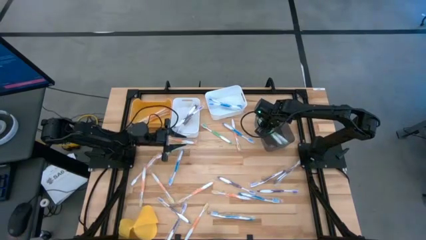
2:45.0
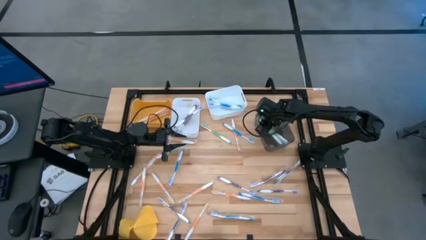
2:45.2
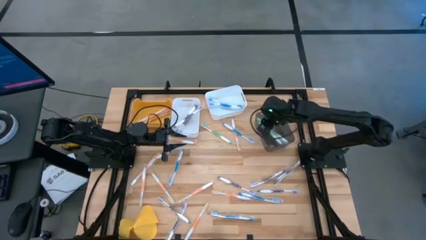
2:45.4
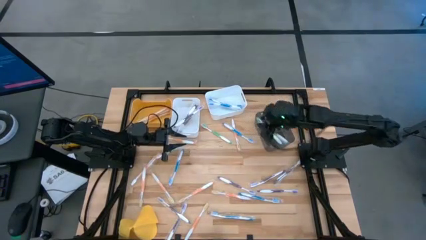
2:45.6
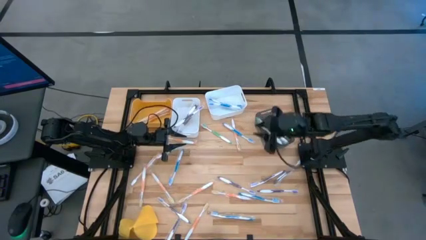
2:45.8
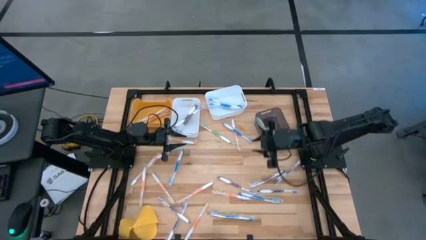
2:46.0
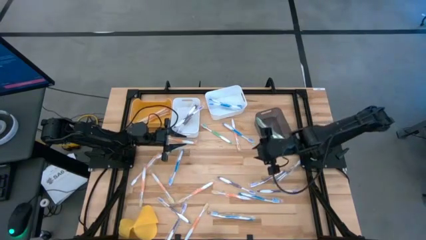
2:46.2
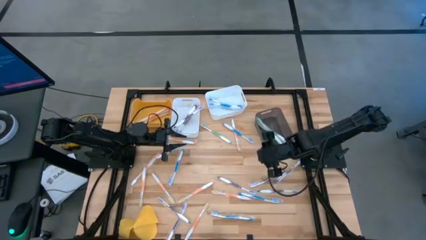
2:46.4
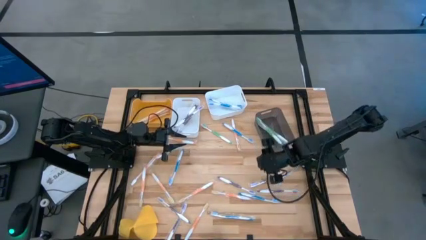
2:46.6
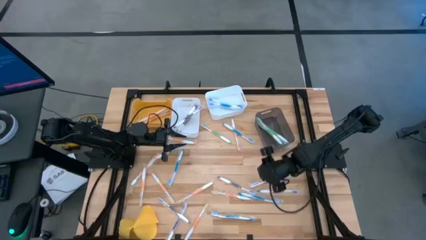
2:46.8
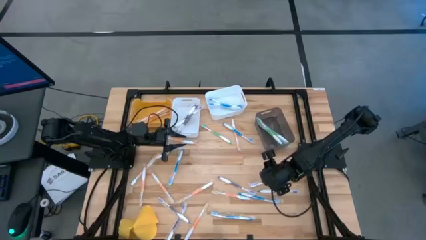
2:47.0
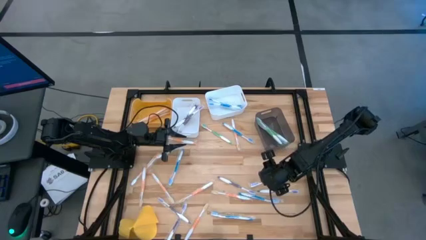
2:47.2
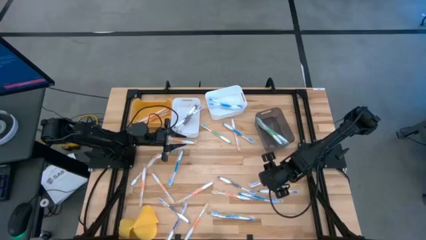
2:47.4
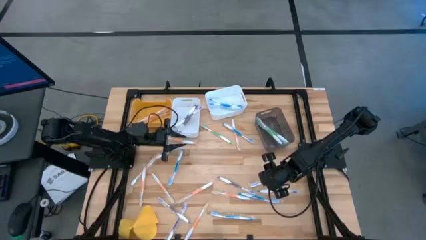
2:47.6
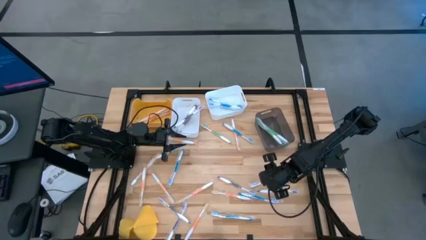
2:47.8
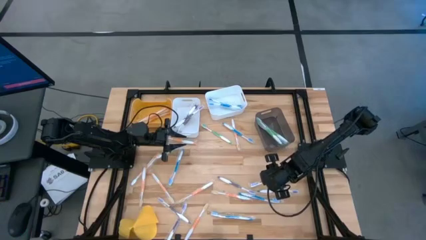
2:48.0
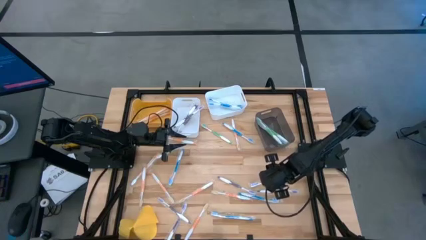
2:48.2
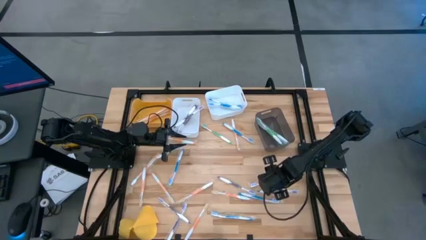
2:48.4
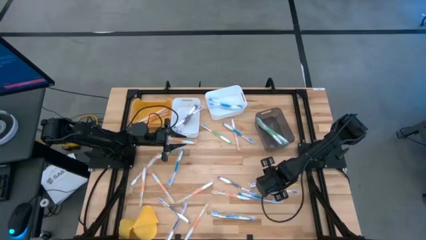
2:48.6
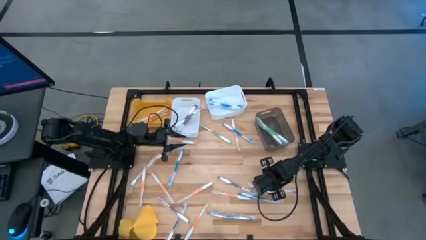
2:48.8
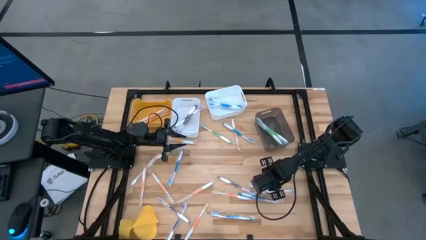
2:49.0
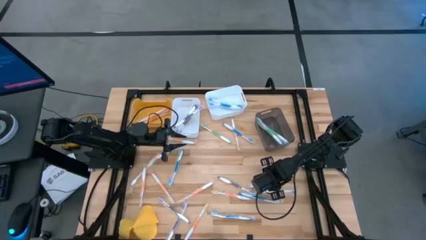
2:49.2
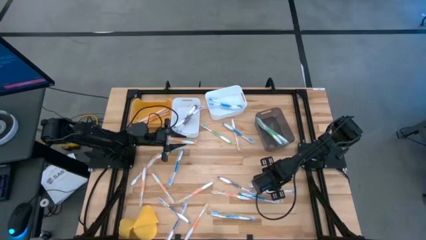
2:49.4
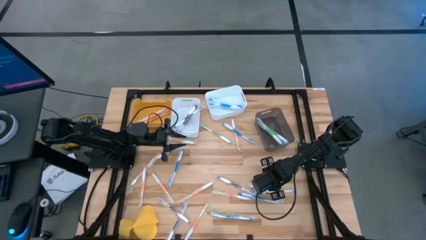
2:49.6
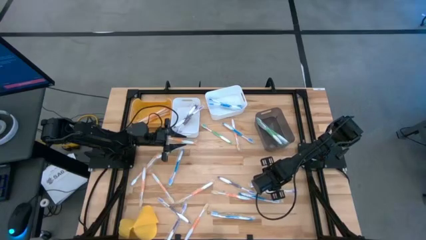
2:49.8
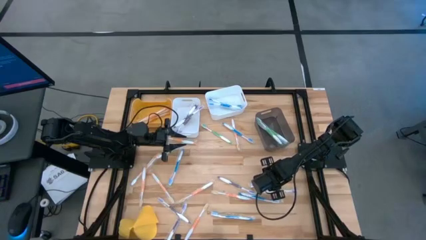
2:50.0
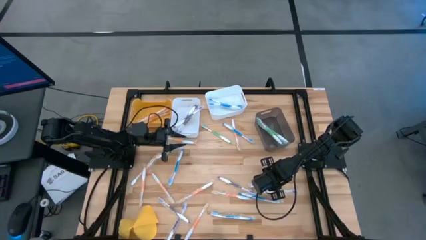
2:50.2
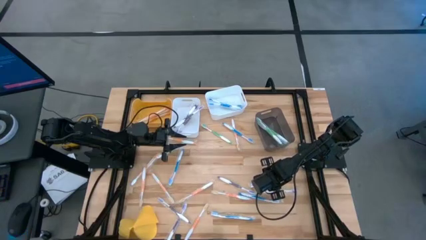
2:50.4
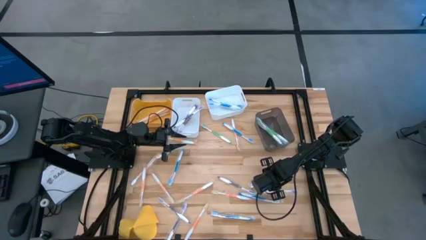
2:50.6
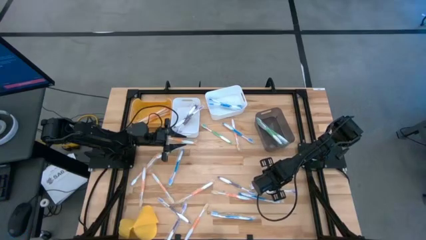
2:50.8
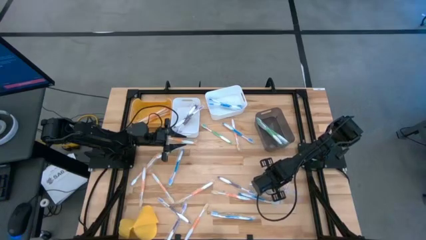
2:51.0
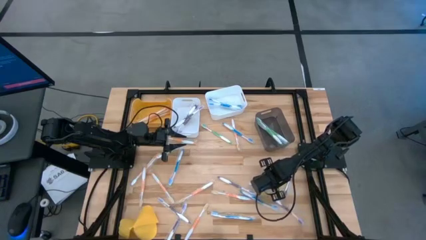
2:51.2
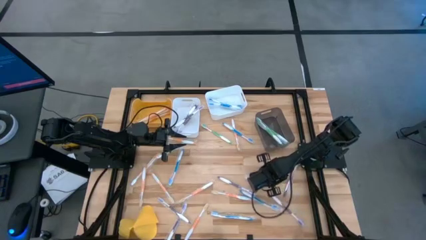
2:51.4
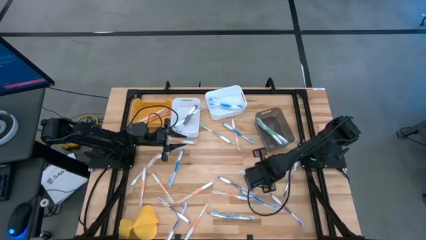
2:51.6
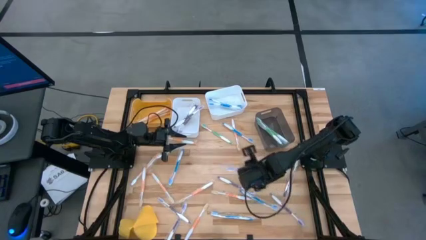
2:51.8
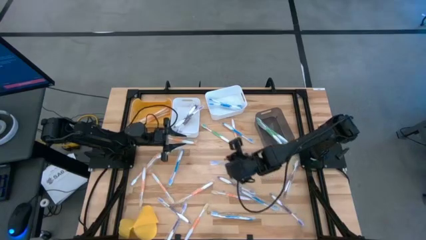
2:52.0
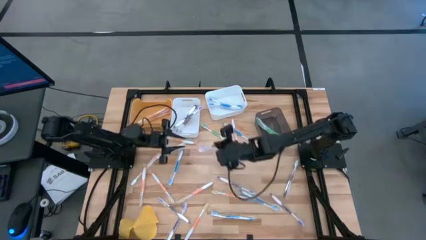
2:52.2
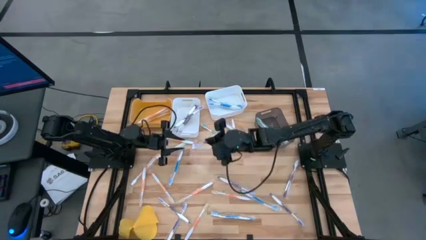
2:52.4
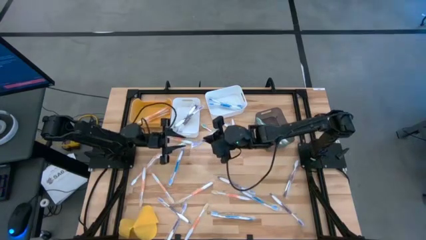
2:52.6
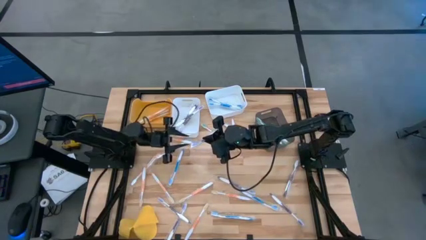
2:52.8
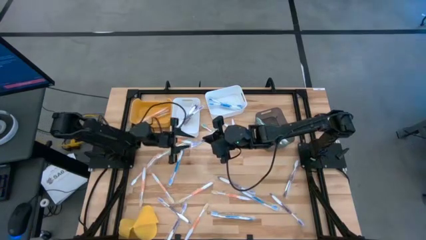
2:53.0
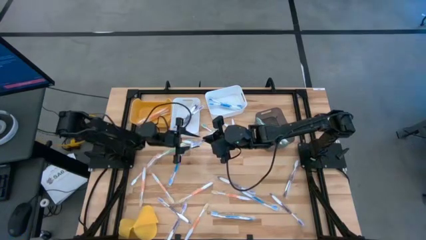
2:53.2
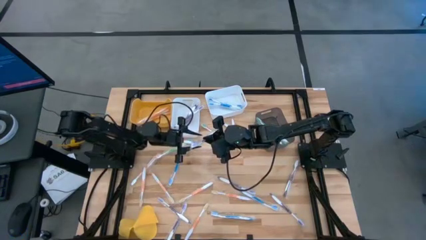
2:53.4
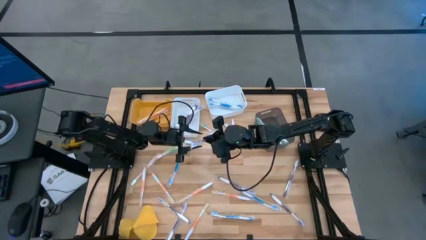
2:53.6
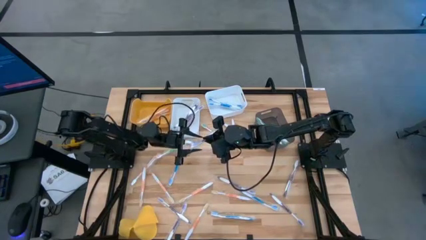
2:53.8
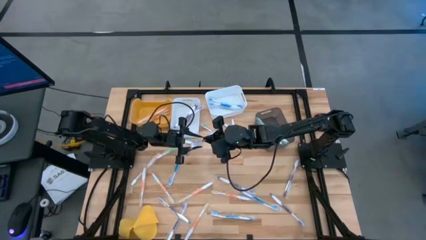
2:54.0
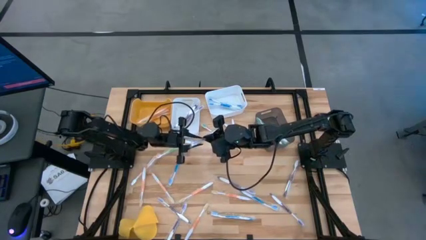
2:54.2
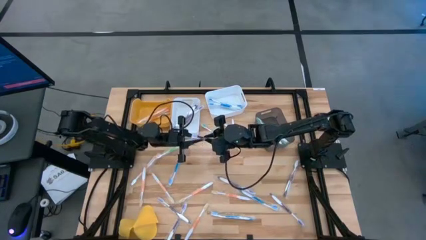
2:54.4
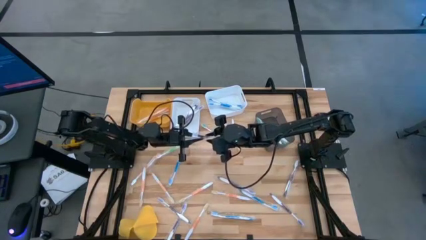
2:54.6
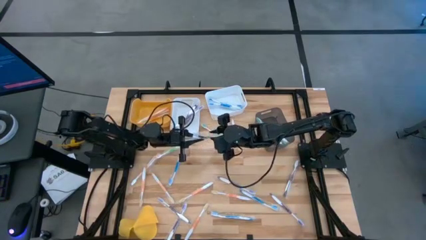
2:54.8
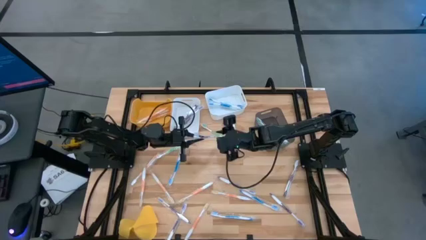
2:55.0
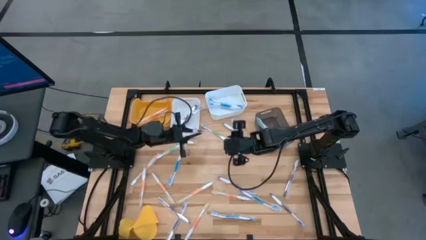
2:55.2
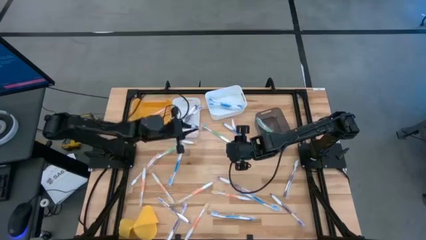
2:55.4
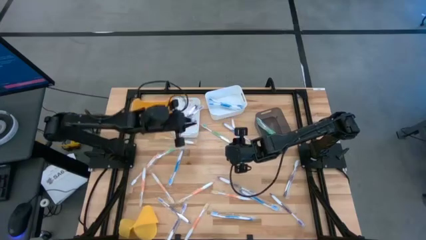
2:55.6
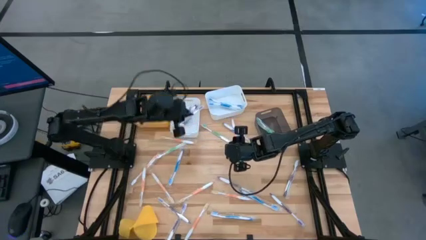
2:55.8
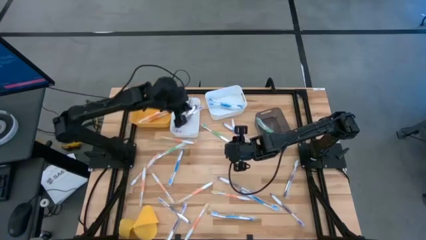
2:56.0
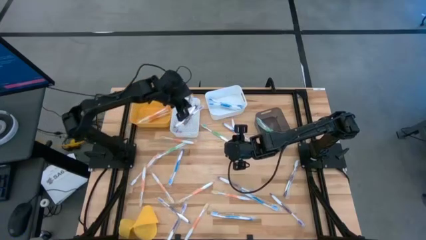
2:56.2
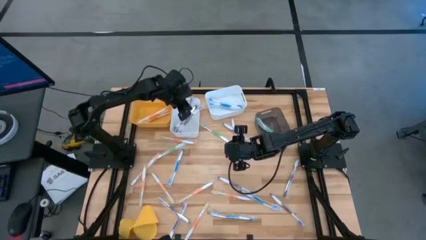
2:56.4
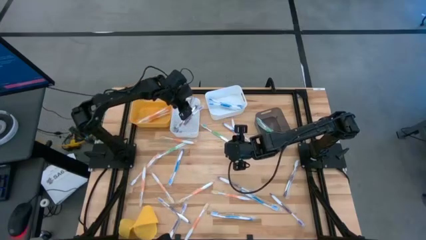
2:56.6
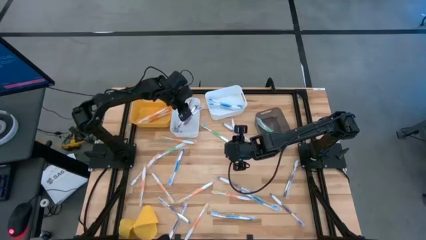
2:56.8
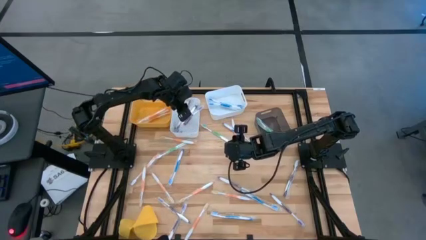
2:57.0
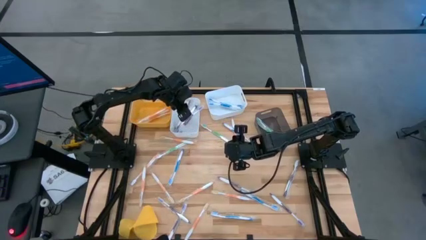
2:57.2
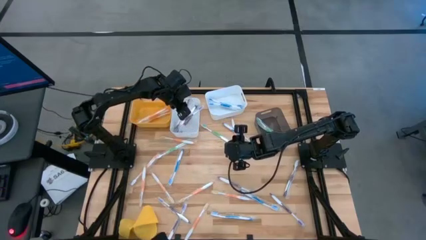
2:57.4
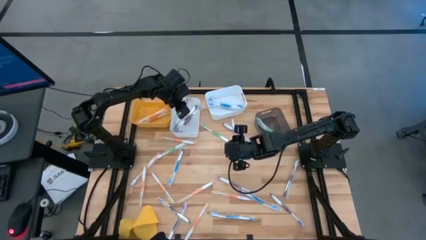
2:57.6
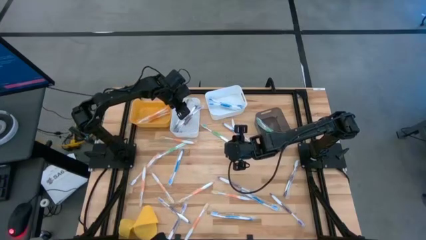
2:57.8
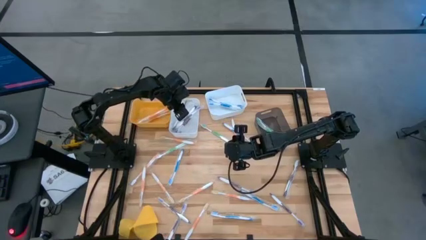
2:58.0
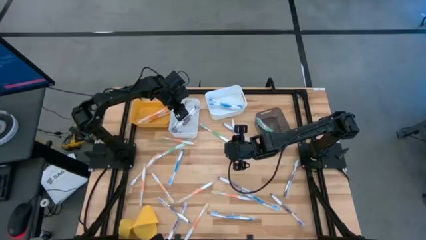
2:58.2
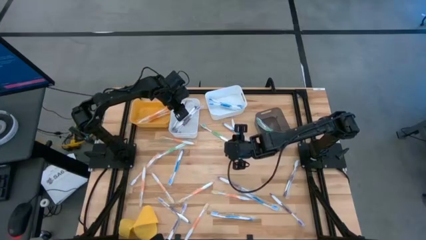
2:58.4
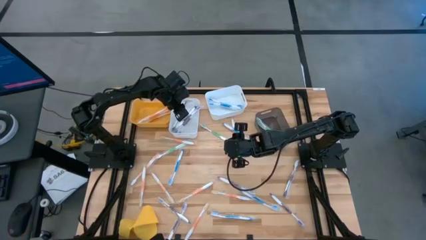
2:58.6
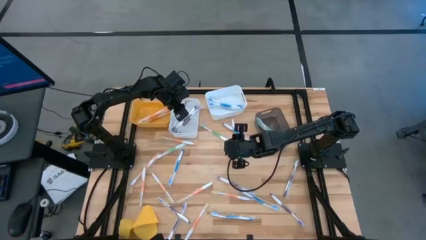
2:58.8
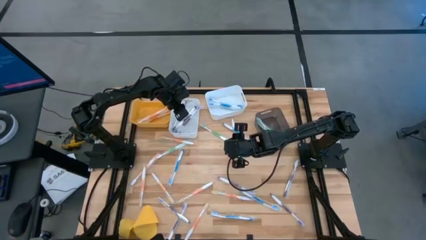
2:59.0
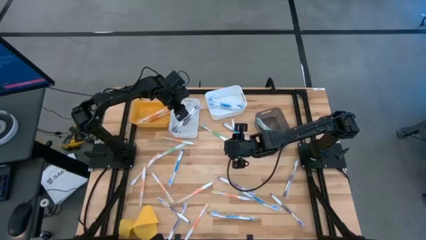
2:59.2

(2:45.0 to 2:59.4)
Task: Pick & Place Toothbrushes
Put the purple toothbrush into the left white bin
